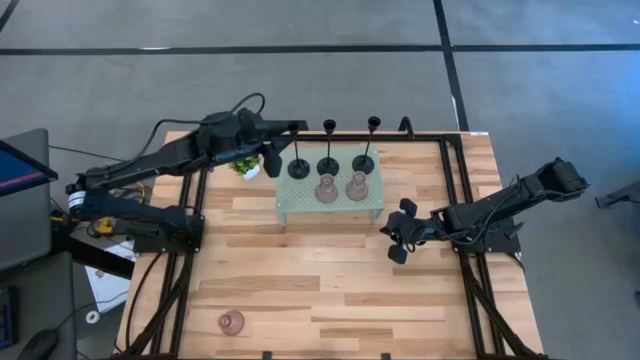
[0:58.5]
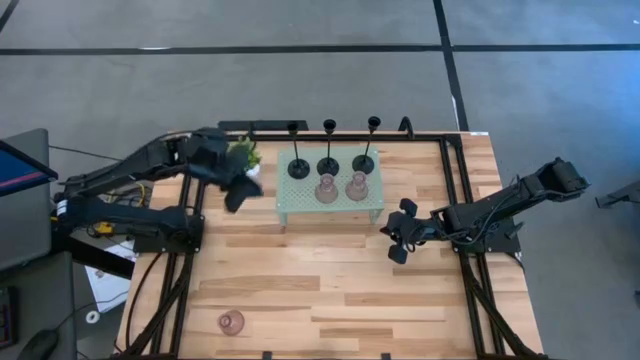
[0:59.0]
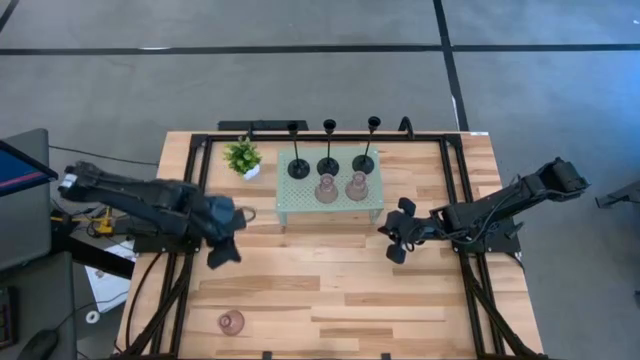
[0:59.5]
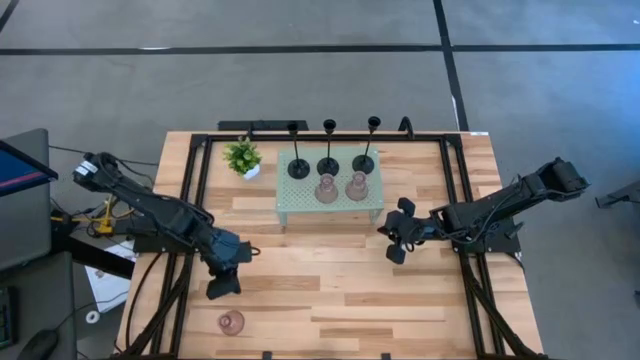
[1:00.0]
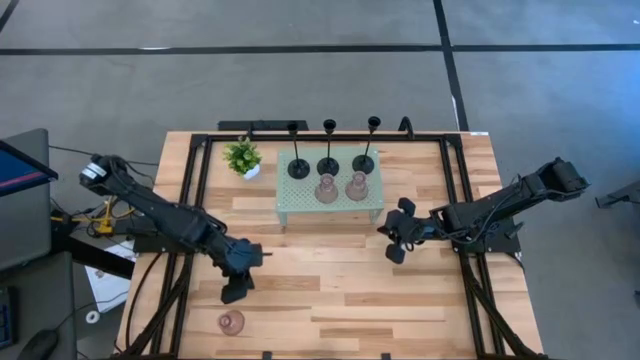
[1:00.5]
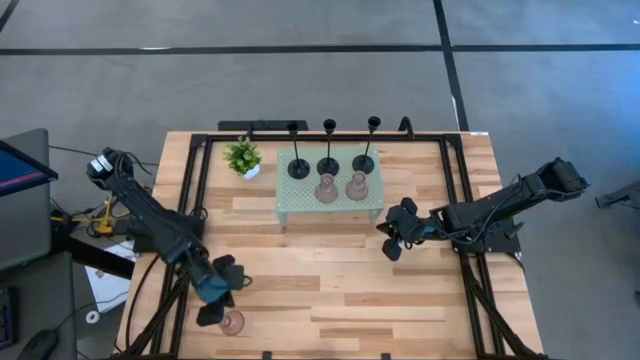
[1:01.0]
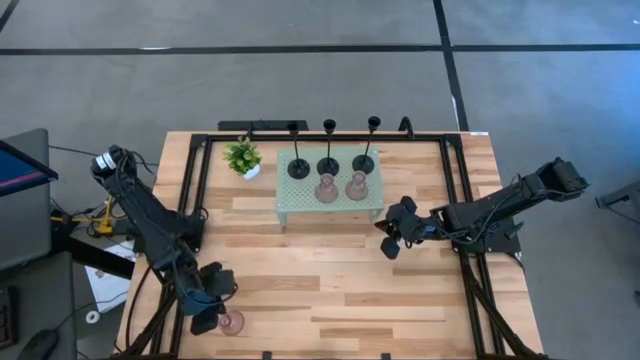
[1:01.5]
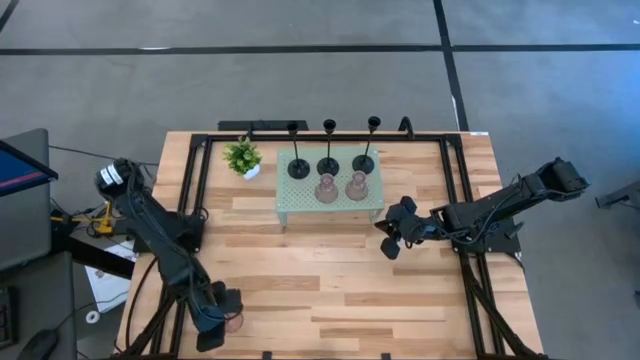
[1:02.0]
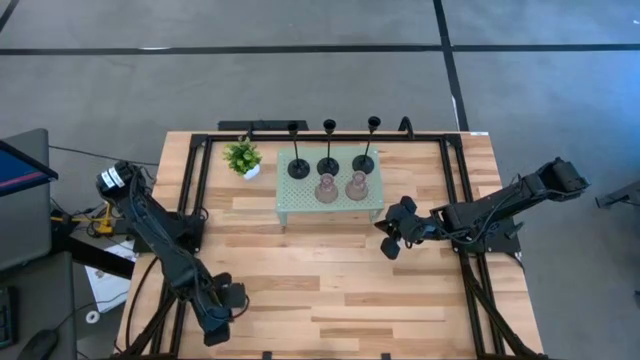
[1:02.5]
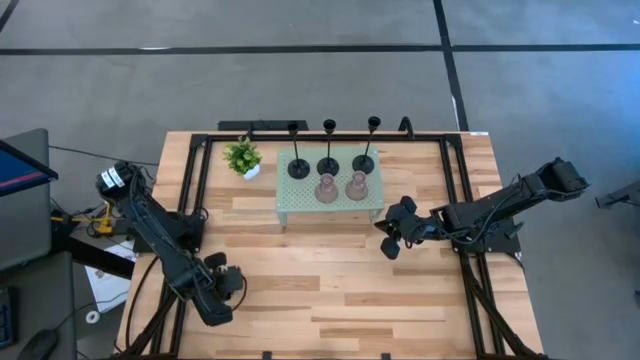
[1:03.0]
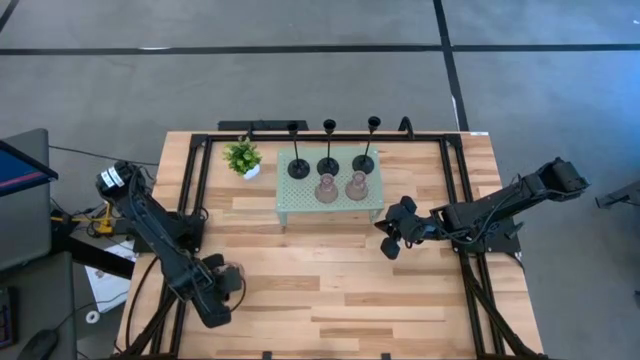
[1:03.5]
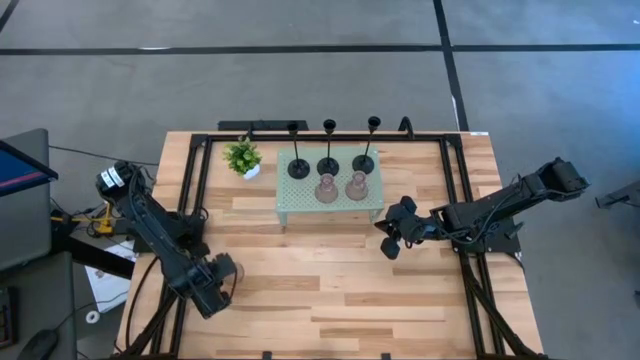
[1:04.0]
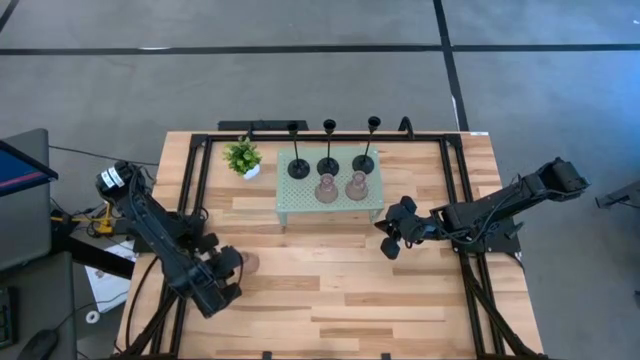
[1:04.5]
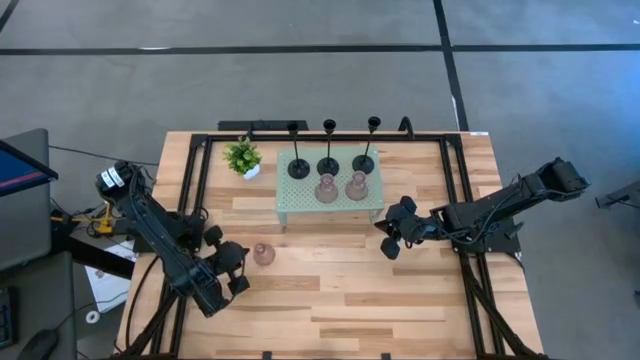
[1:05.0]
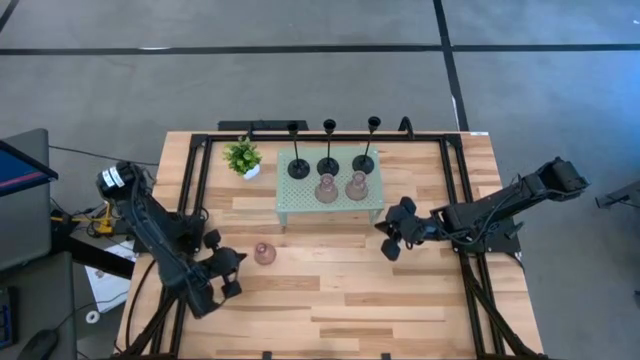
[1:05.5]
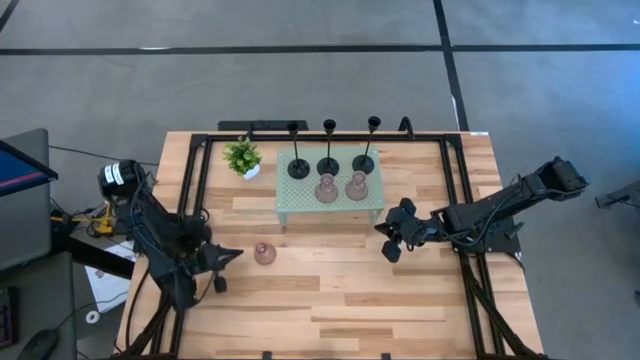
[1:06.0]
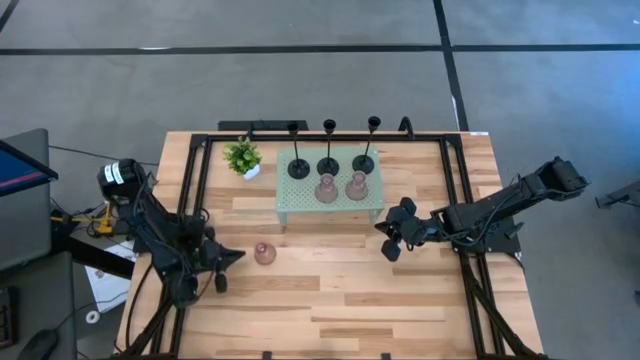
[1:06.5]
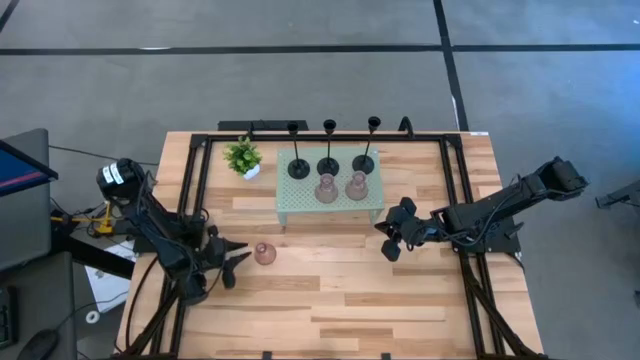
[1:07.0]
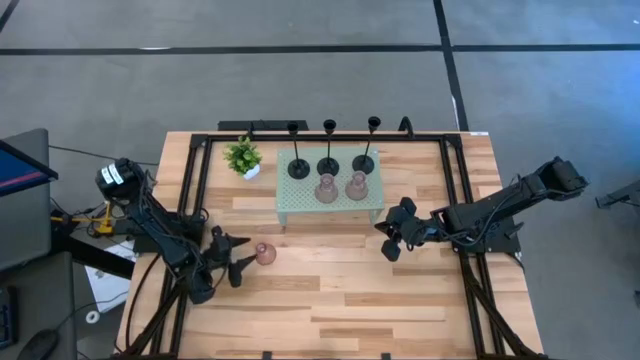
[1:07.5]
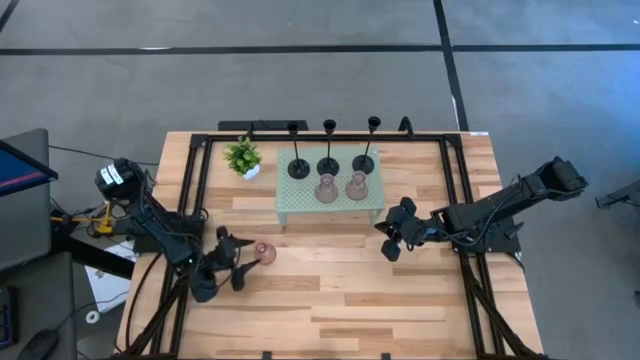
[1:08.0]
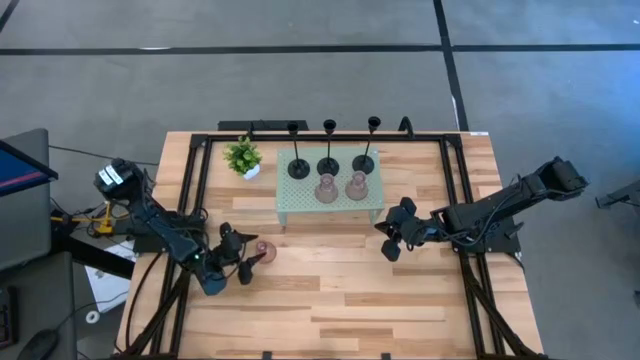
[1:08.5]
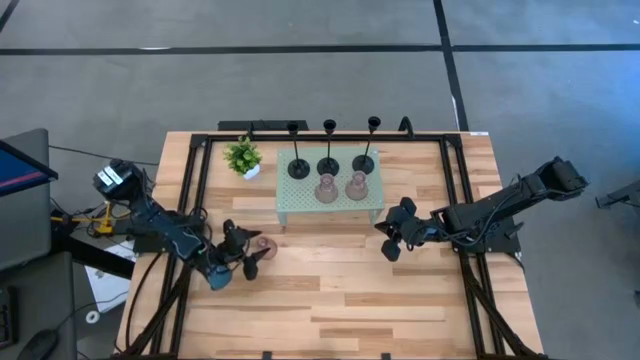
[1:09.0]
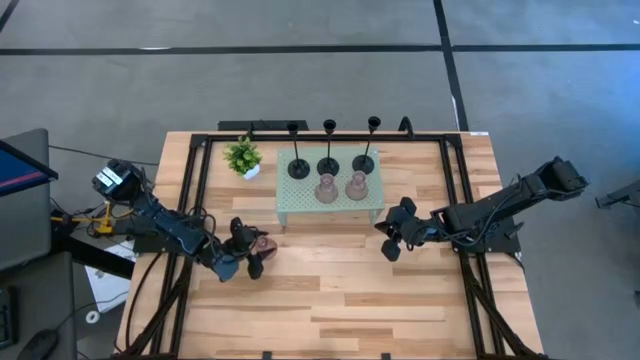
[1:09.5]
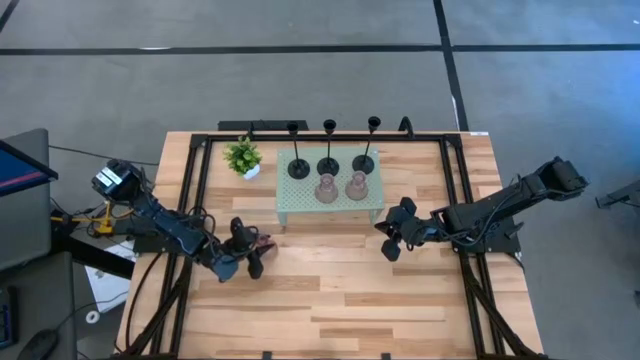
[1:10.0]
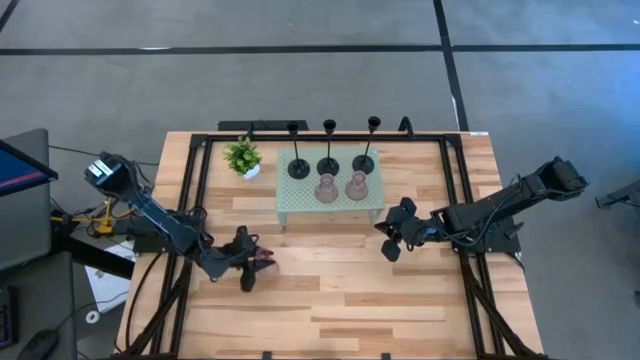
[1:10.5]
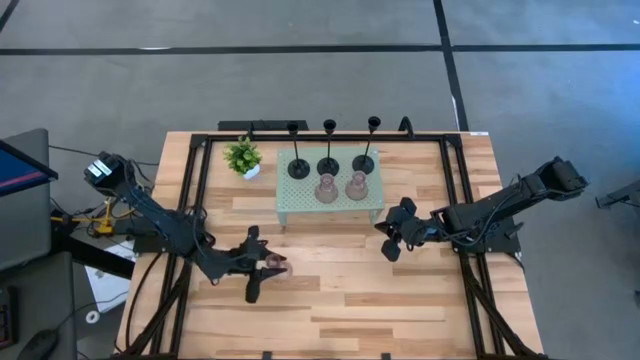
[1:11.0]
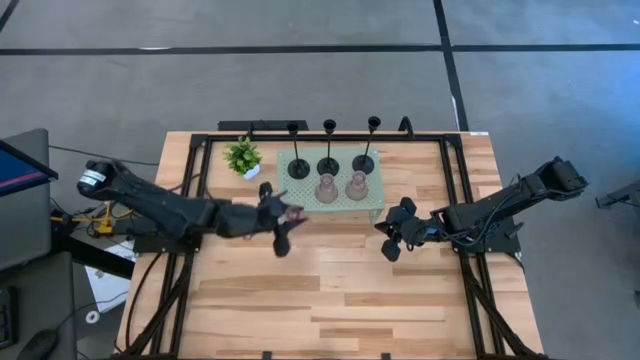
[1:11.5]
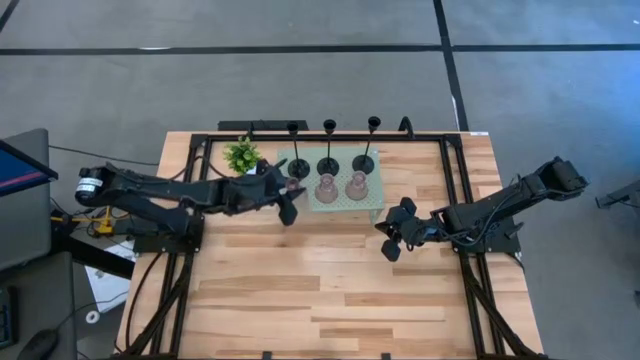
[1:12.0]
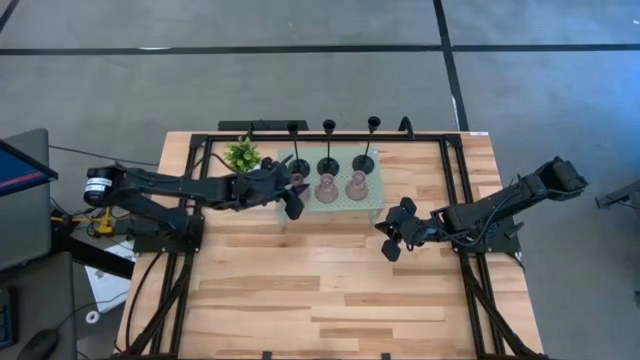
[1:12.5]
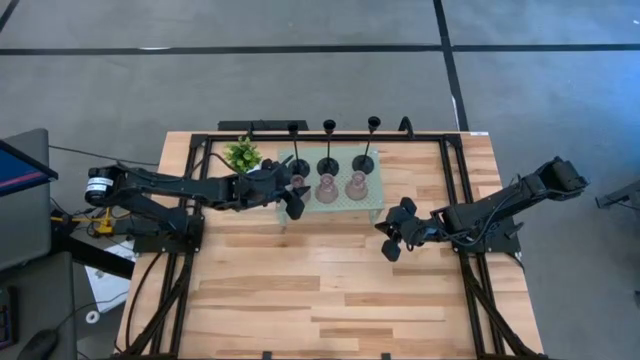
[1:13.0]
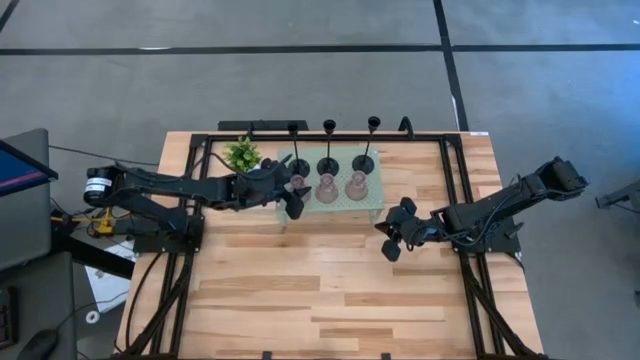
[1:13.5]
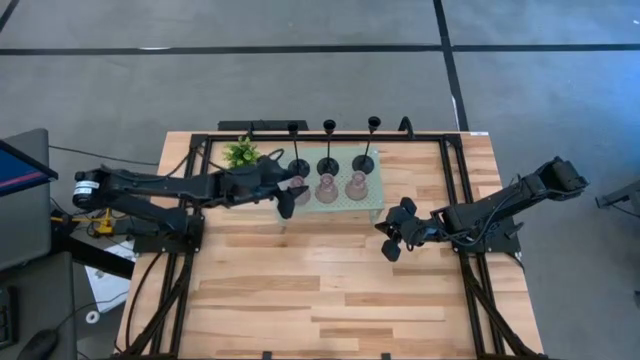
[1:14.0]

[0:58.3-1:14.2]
Task: Pick & Place candle stick holders
Put the pink glass candle holder on the shelf aligned with the left black candle holder

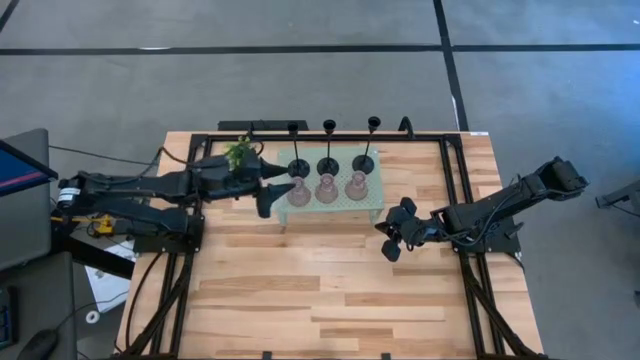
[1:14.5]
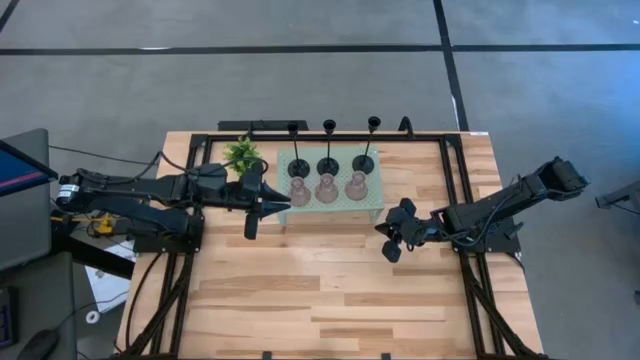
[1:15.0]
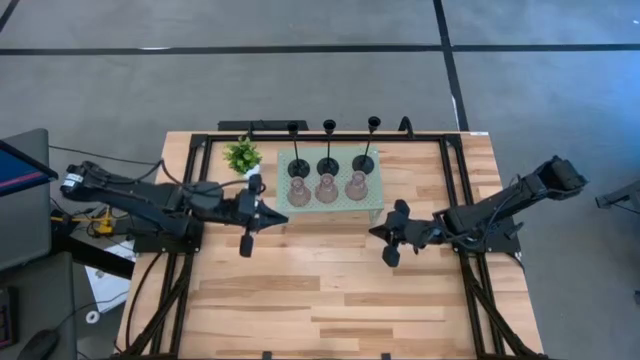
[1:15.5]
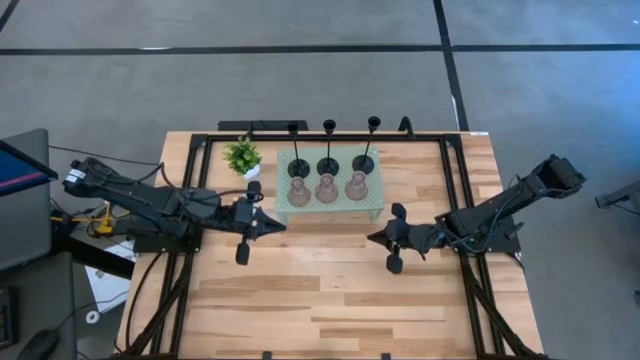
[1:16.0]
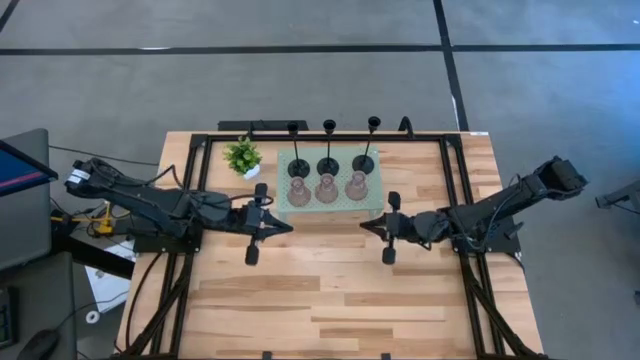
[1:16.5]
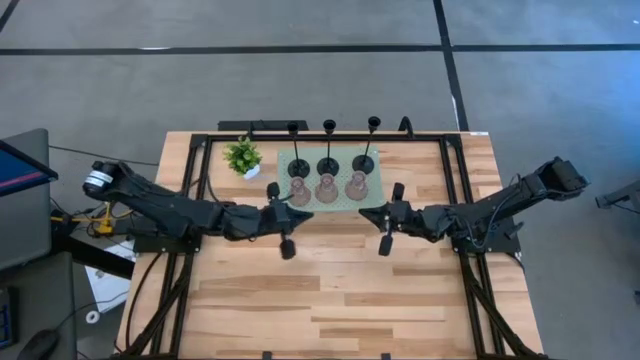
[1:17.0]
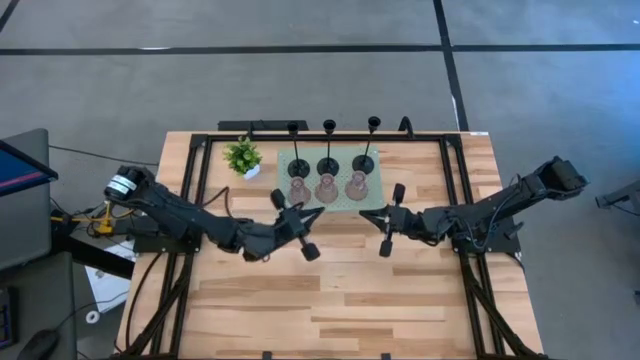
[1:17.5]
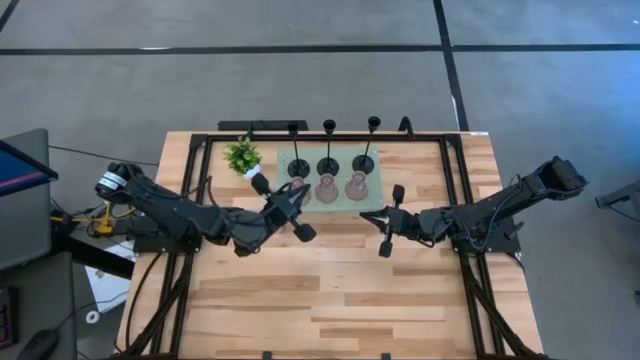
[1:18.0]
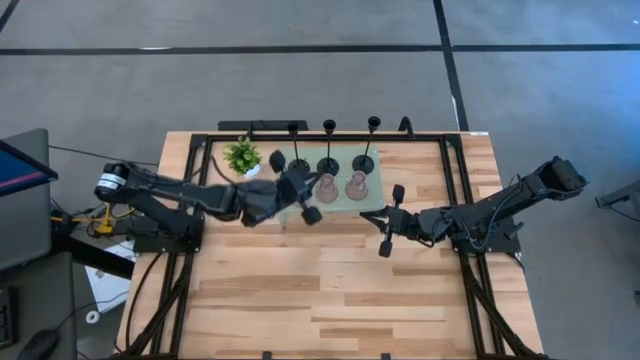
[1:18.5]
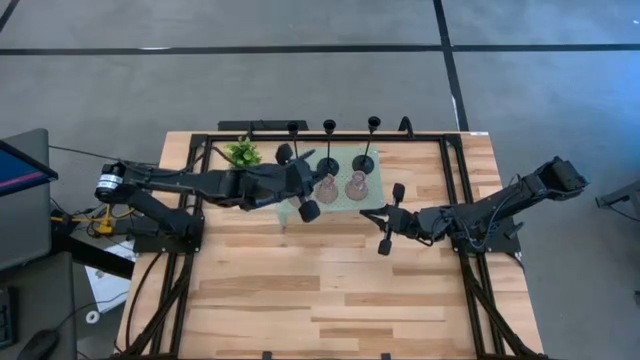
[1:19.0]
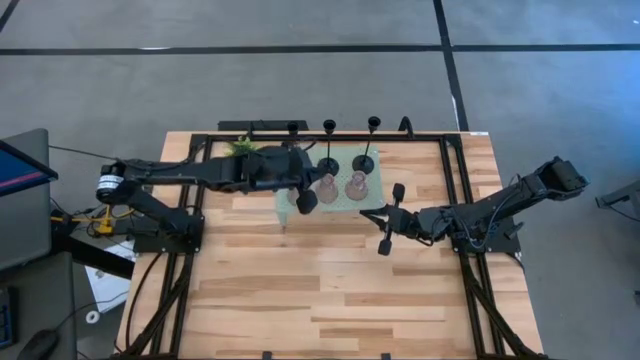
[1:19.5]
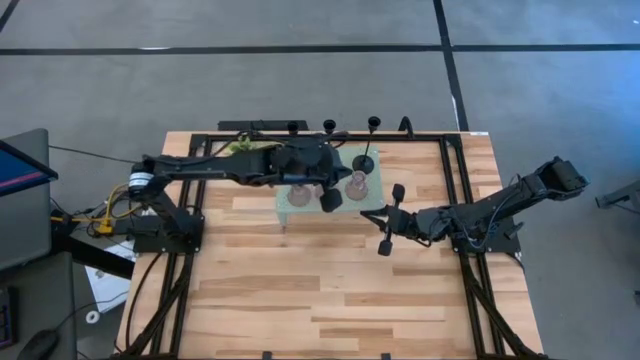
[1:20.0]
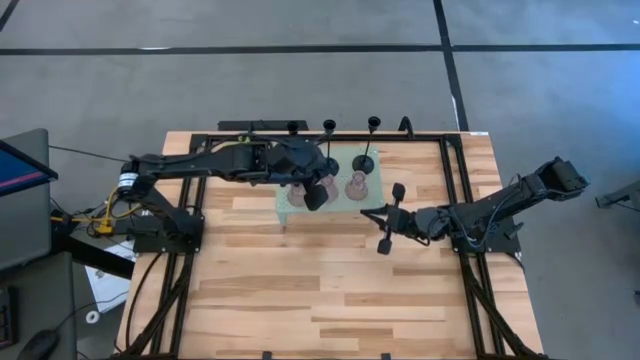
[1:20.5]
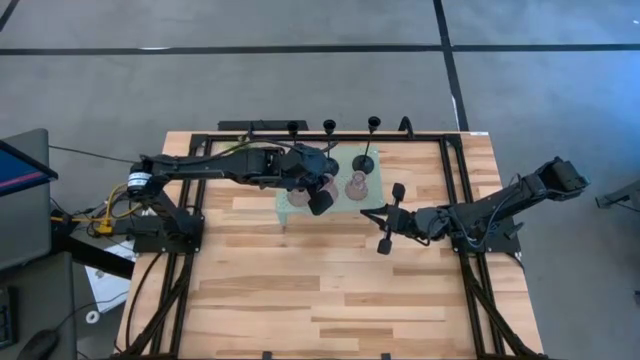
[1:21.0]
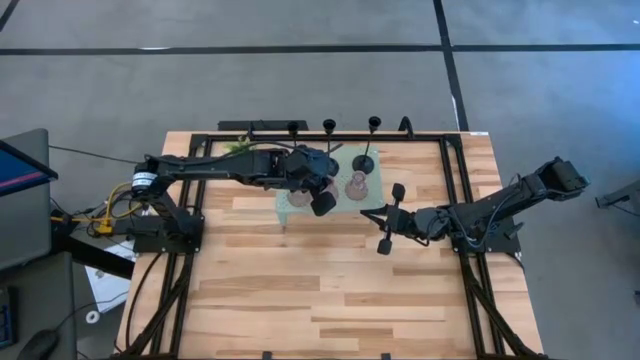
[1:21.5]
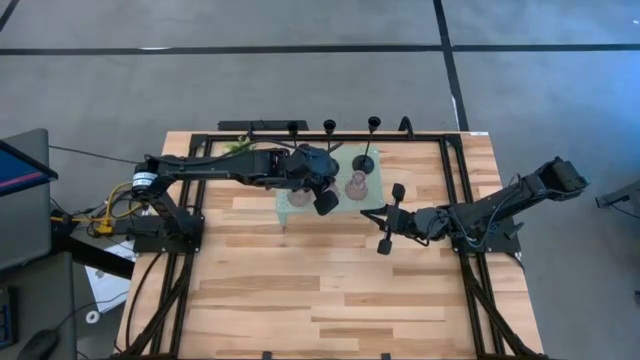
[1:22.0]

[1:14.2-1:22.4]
Adjust the middle pink glass candle holder on the shelf
